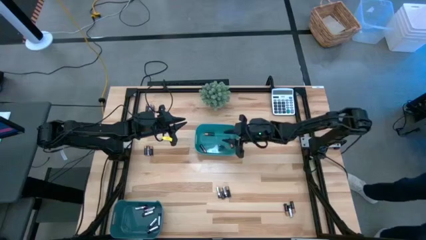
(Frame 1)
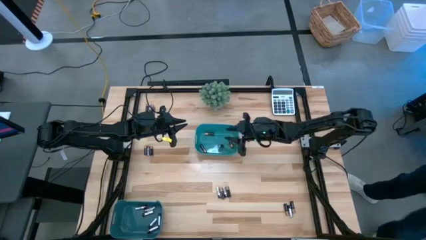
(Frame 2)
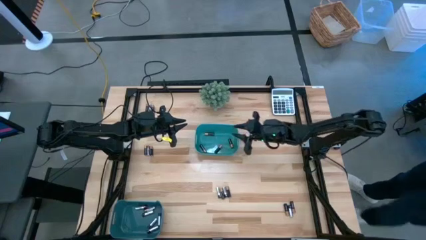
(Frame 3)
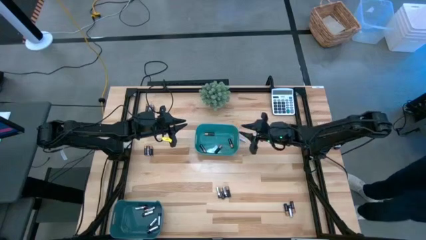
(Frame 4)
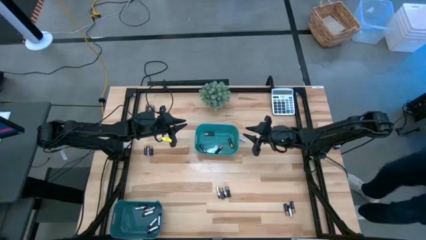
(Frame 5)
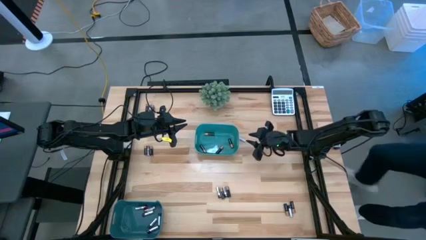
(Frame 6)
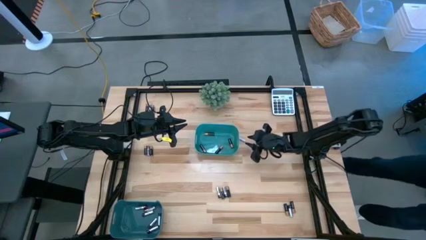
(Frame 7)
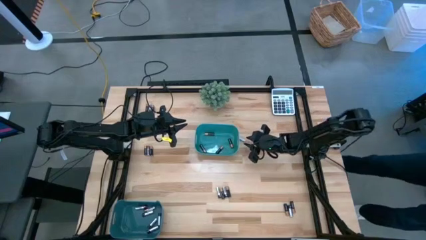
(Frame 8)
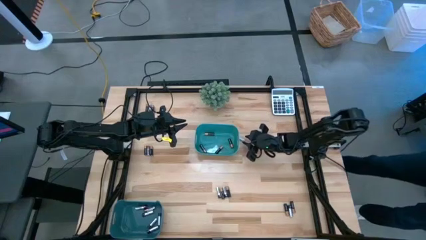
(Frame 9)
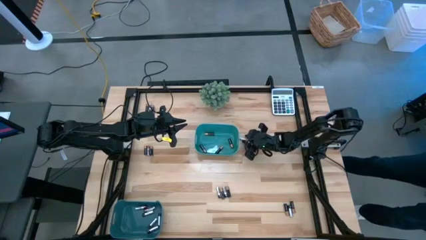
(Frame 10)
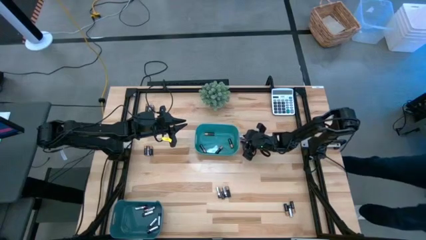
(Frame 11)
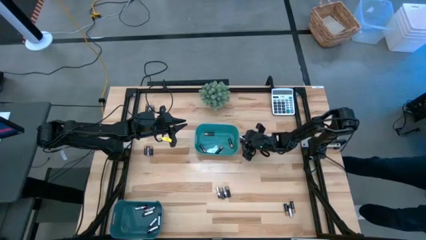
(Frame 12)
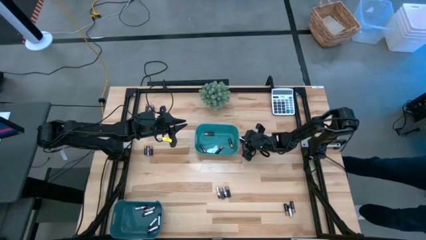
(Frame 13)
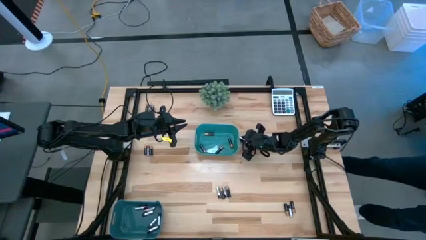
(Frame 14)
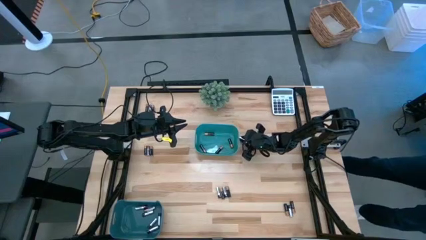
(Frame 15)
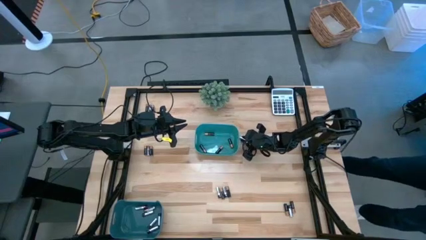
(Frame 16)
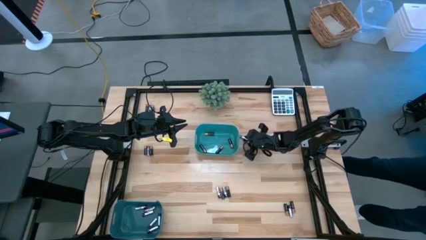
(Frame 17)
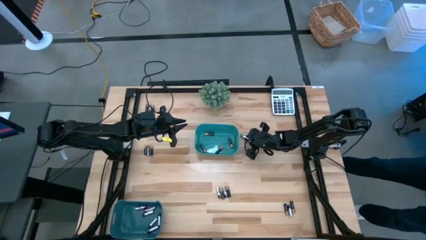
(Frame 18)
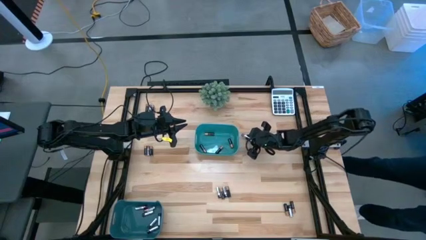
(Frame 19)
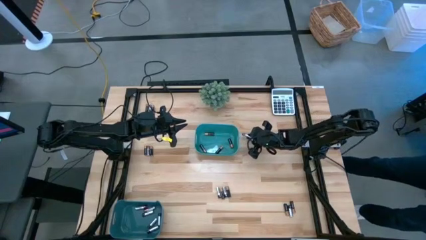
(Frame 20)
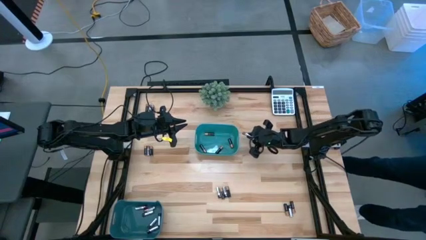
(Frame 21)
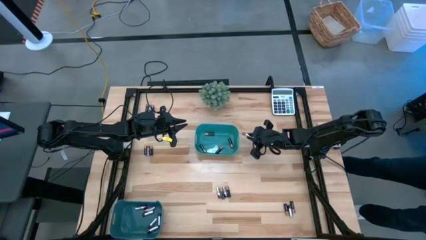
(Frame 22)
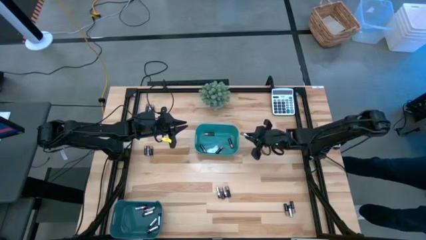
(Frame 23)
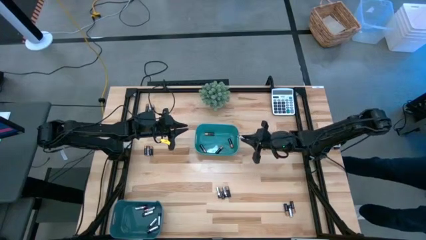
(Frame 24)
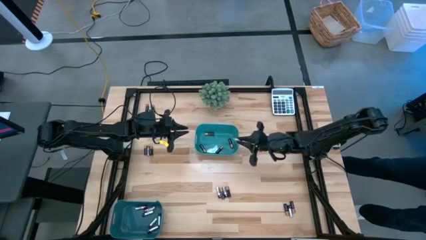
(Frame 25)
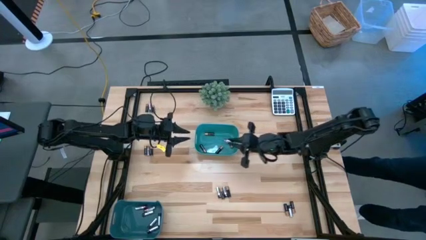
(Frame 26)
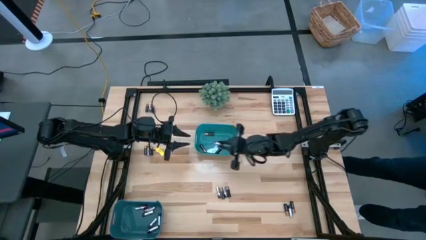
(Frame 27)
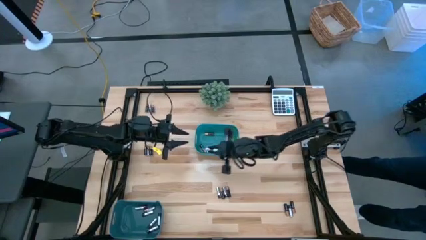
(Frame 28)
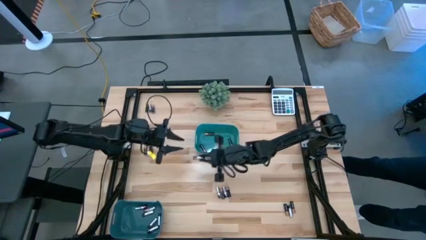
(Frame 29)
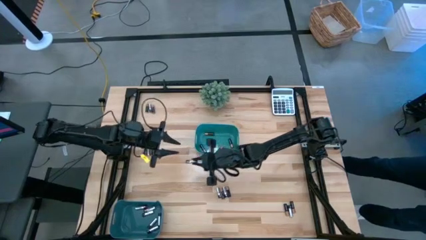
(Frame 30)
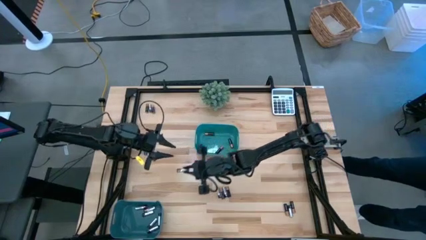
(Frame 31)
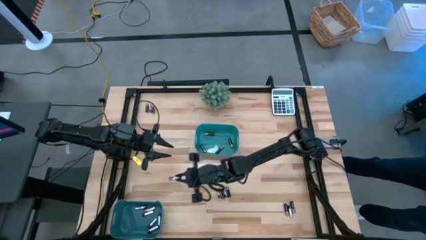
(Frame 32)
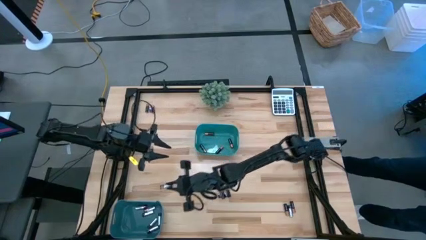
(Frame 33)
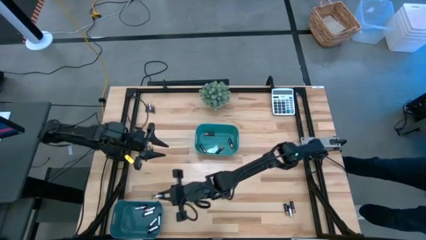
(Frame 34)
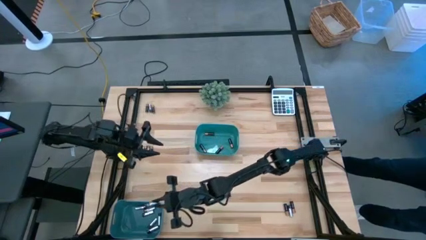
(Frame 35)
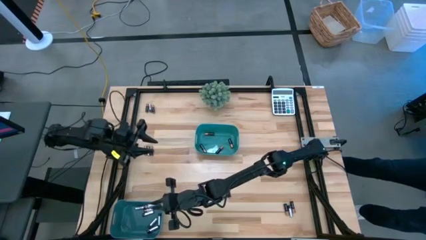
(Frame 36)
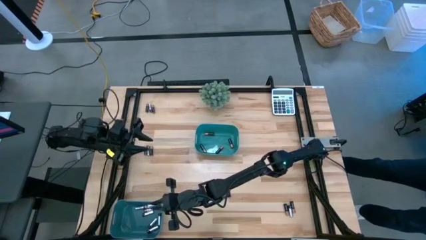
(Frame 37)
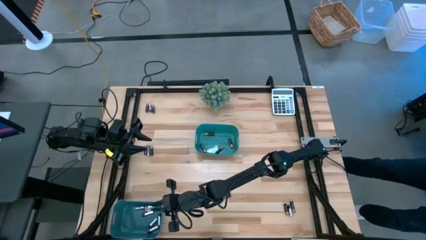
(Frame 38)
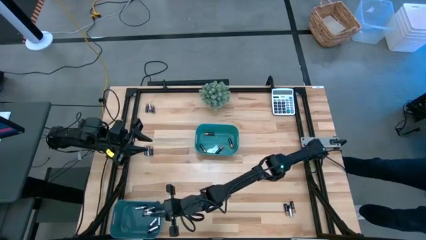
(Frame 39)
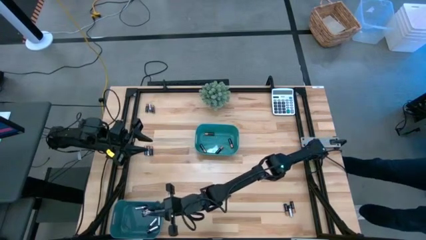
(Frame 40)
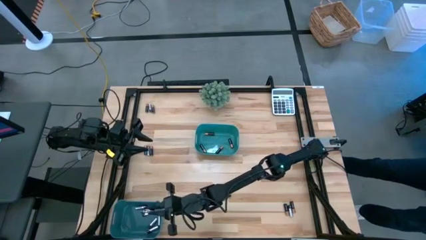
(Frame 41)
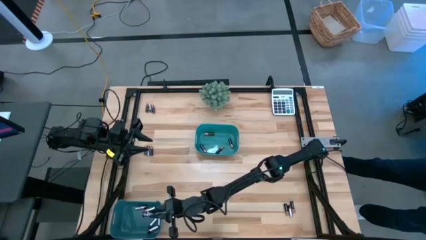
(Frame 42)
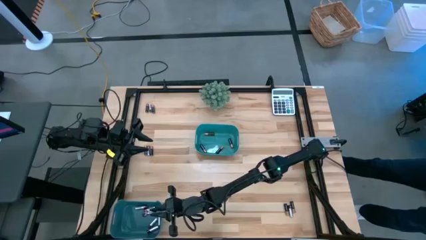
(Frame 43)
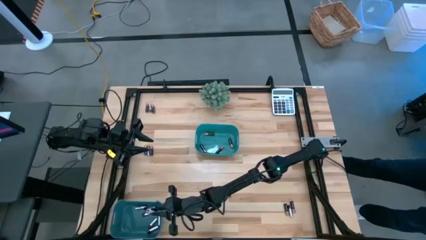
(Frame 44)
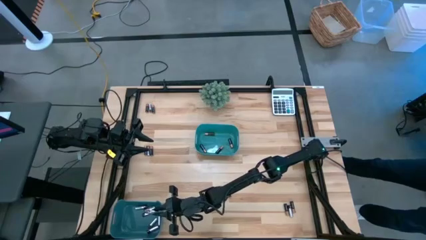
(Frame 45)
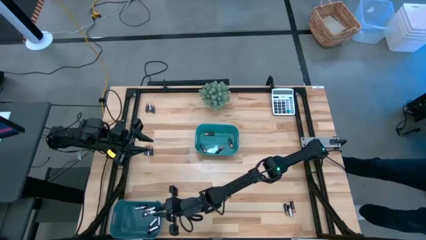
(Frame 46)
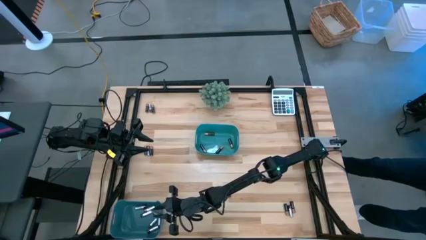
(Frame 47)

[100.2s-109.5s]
Task: Sort batteries
Put the silver battery into the blue bin

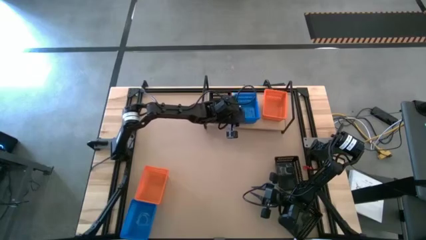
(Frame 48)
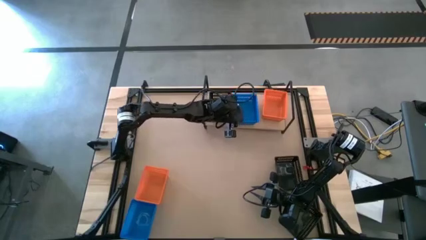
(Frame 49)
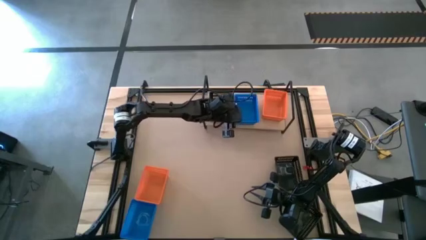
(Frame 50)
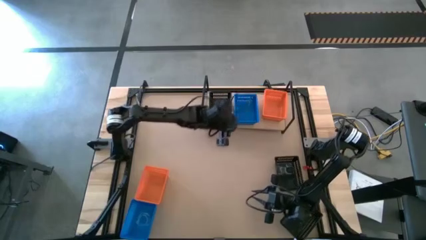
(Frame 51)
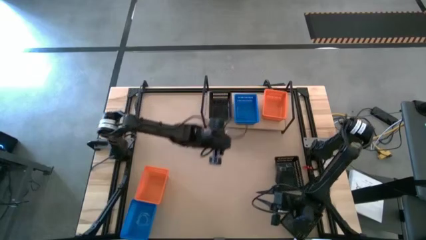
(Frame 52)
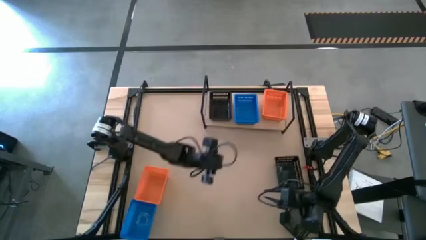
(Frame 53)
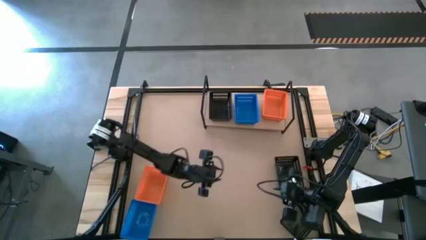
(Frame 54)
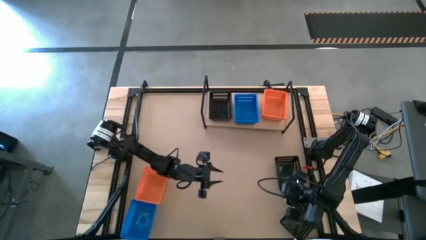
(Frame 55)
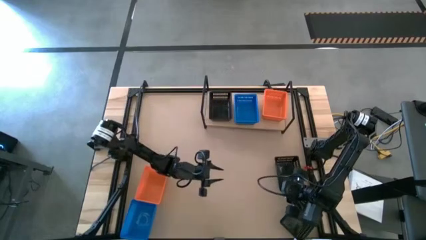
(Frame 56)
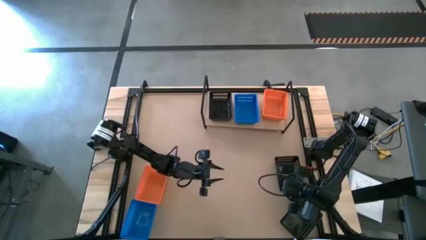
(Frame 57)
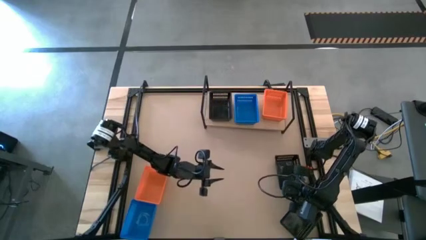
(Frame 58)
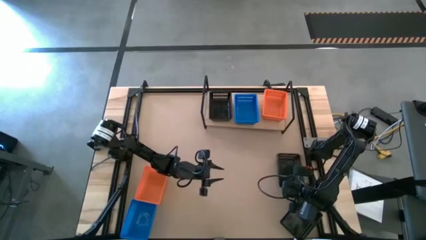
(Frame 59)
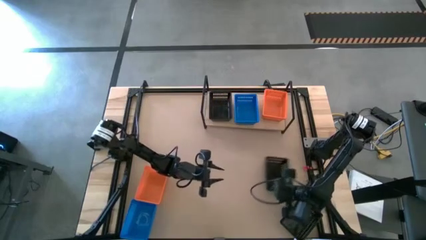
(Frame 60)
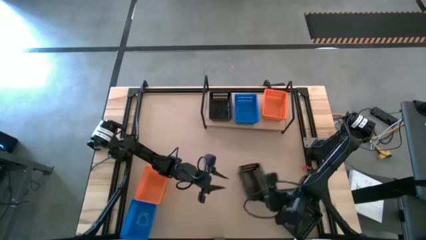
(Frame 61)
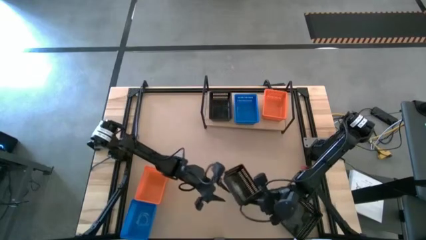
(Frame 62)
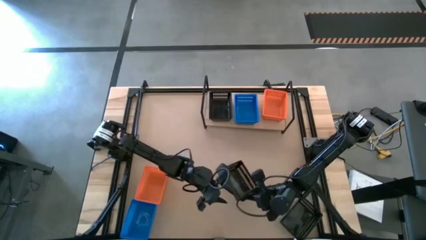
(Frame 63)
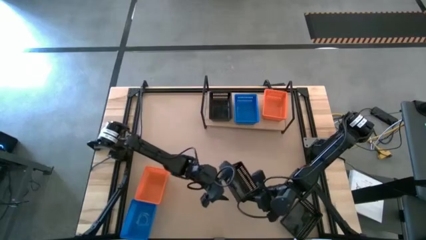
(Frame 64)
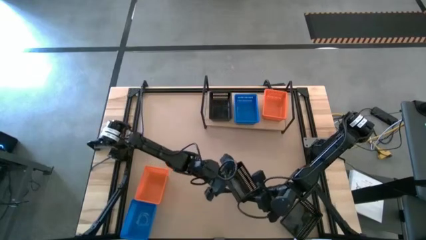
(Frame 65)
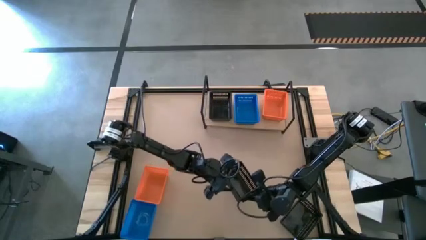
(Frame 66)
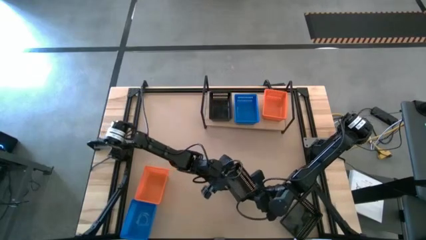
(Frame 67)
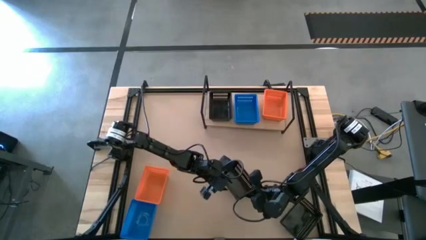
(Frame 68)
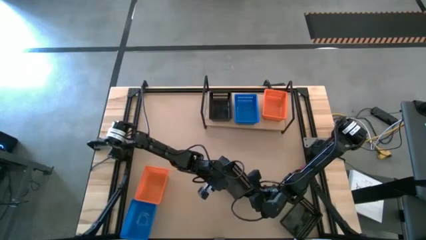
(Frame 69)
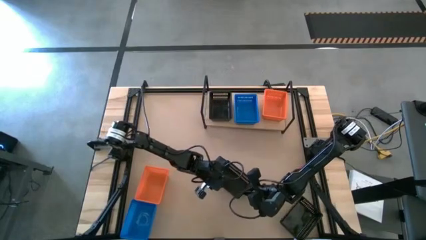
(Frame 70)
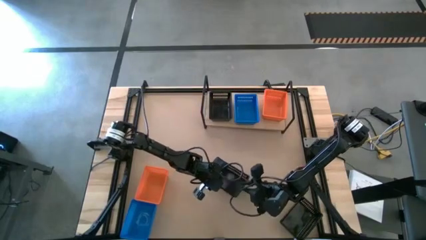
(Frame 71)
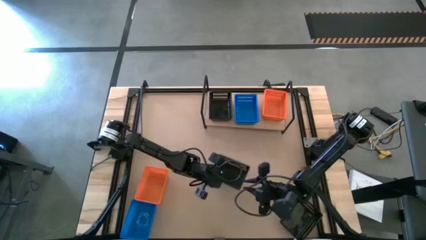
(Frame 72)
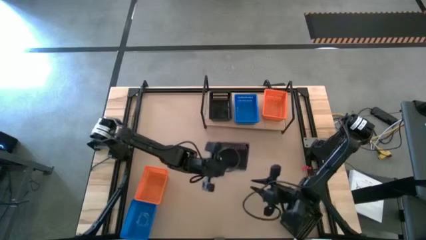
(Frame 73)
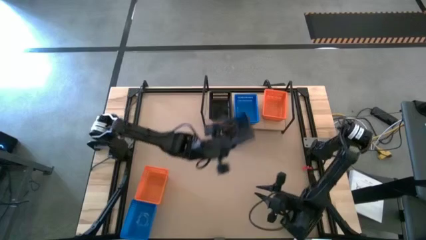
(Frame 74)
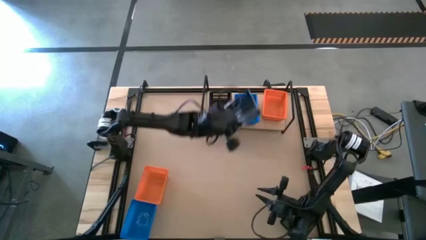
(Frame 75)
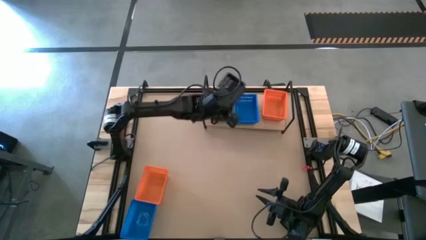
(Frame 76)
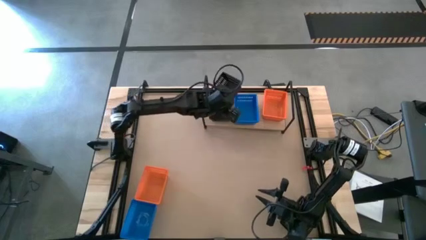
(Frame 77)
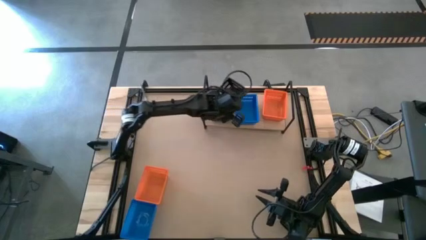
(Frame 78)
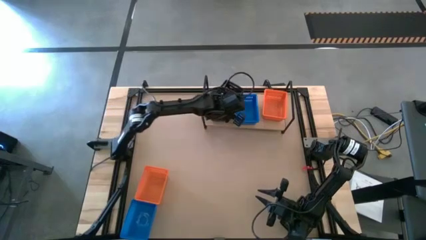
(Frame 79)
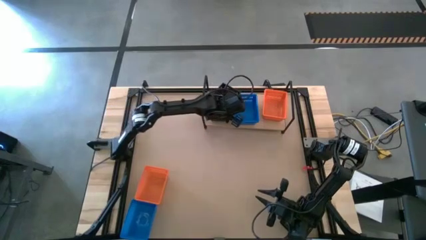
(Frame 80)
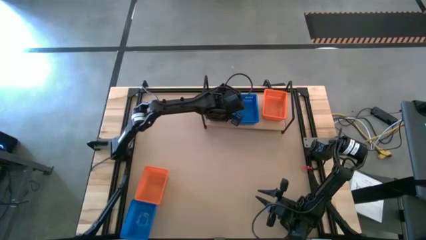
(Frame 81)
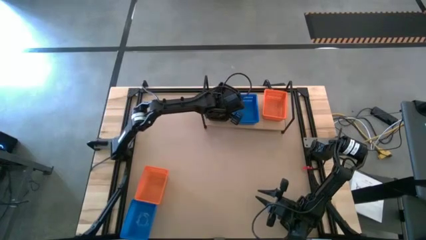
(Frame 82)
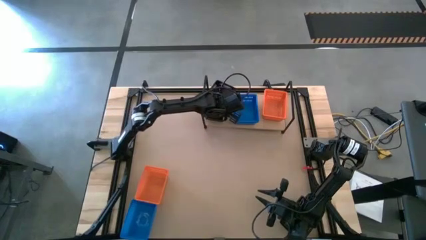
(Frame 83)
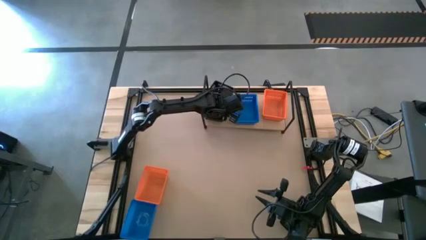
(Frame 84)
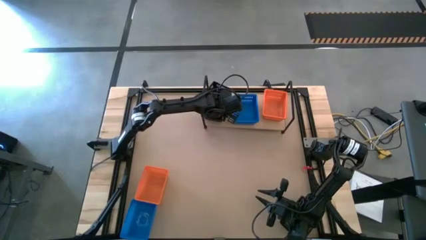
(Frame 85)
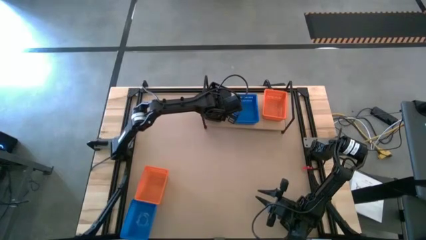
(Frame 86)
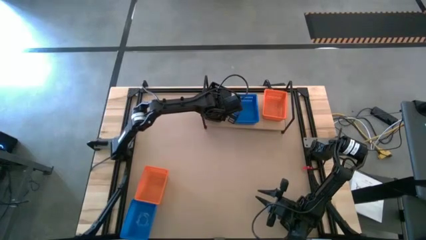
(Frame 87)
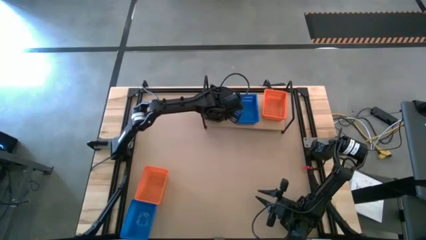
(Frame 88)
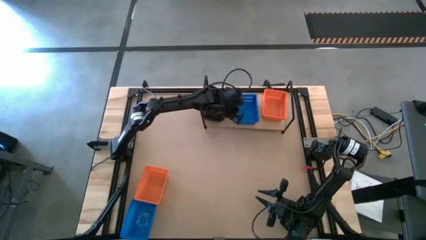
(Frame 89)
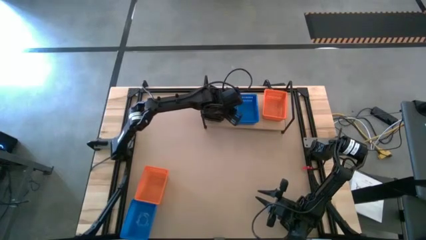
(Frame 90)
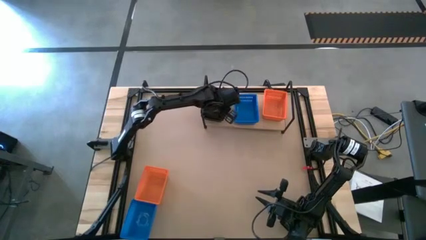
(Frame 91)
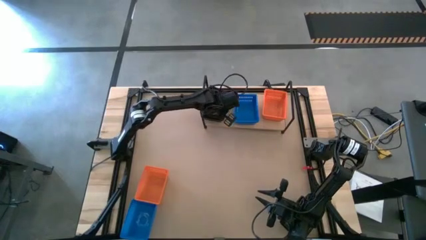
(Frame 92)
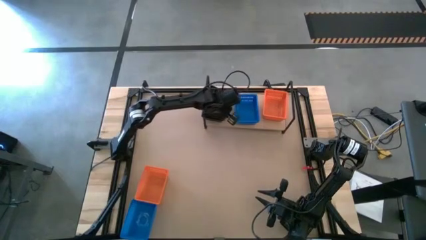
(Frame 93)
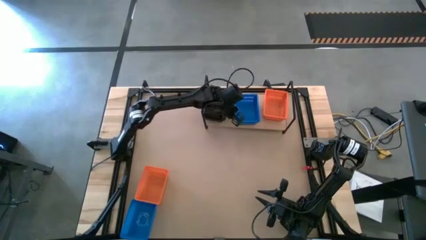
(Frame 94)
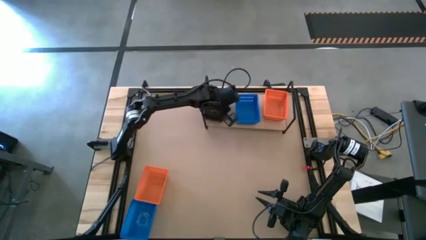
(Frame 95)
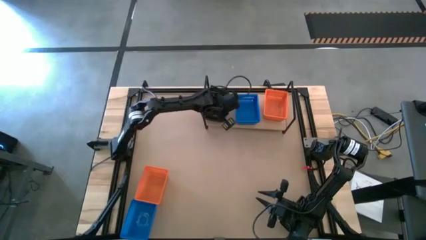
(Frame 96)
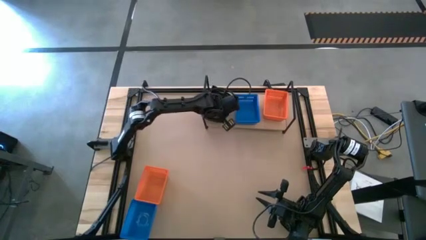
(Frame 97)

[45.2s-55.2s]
Task: Stack baskets on shelf by color
Stack the top black basket on top of the black basket on the shelf
